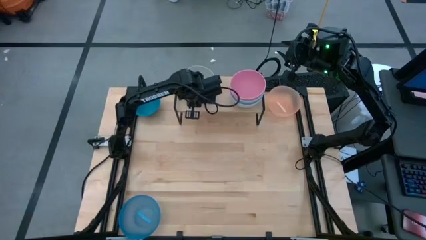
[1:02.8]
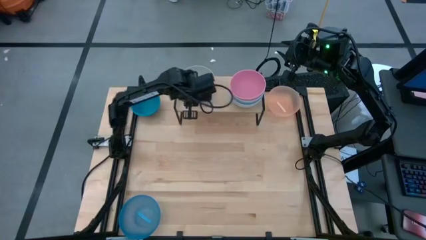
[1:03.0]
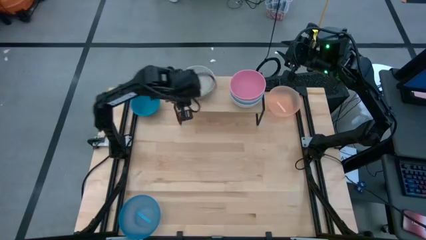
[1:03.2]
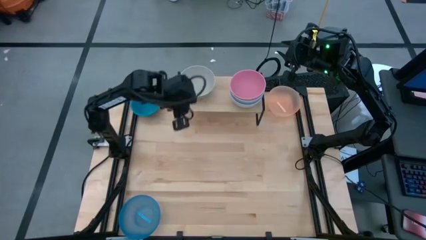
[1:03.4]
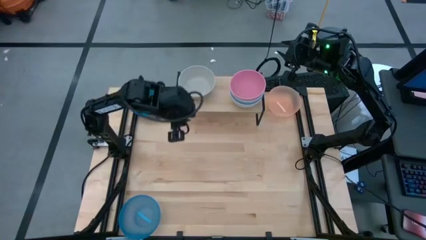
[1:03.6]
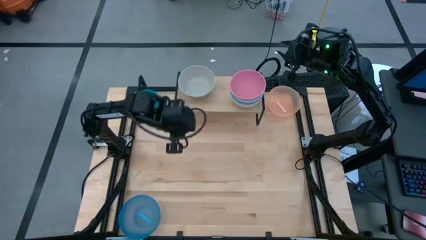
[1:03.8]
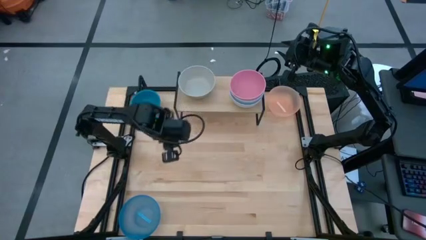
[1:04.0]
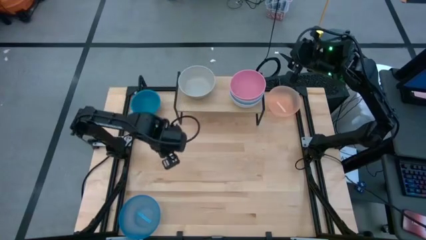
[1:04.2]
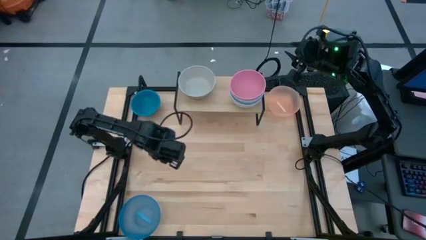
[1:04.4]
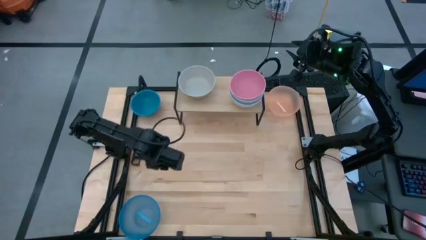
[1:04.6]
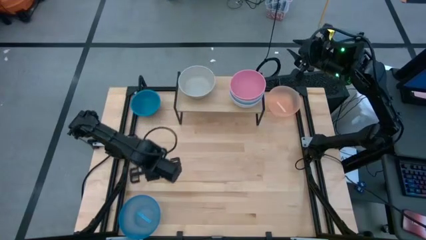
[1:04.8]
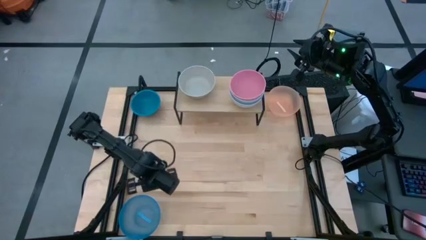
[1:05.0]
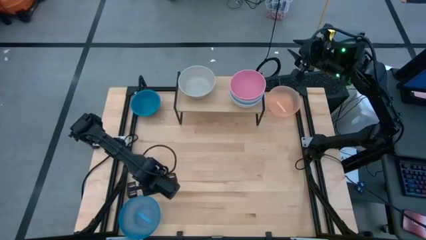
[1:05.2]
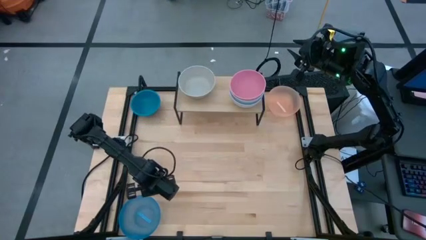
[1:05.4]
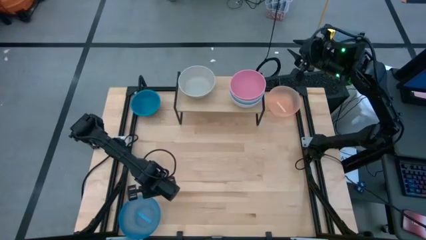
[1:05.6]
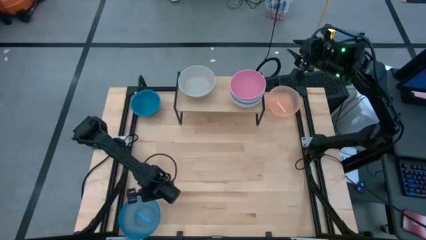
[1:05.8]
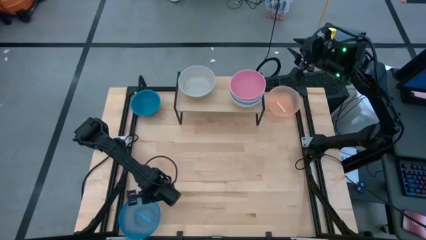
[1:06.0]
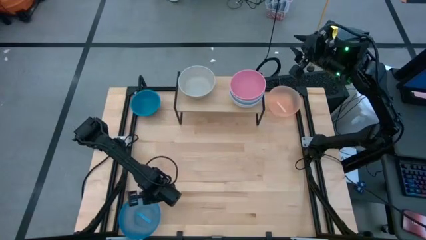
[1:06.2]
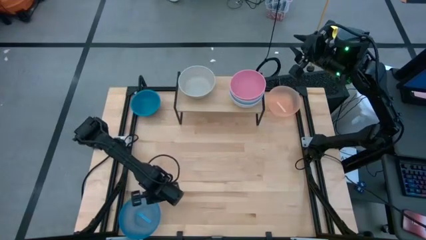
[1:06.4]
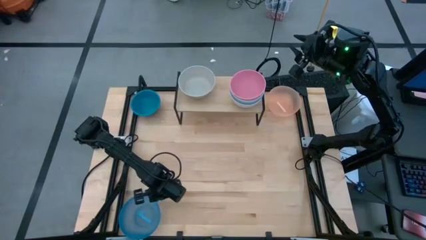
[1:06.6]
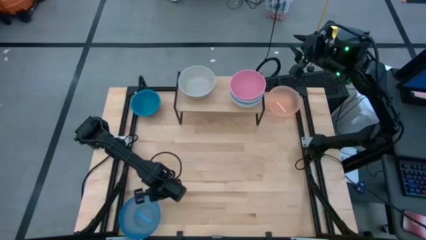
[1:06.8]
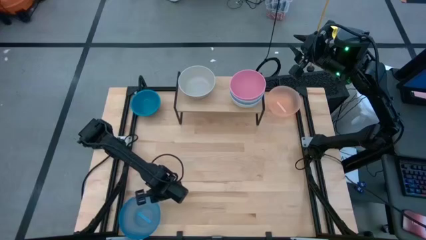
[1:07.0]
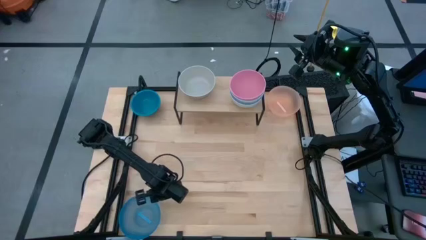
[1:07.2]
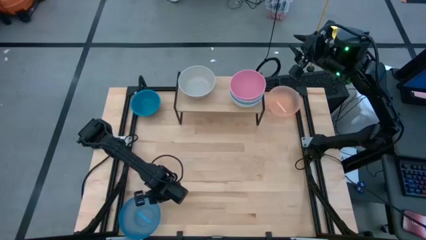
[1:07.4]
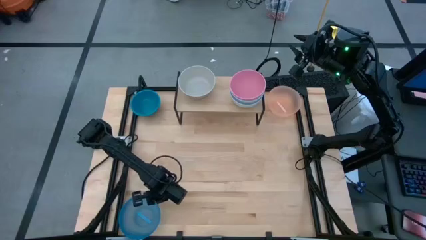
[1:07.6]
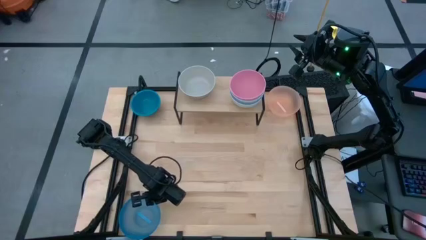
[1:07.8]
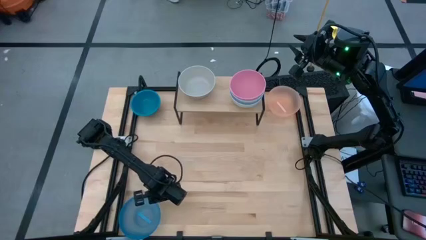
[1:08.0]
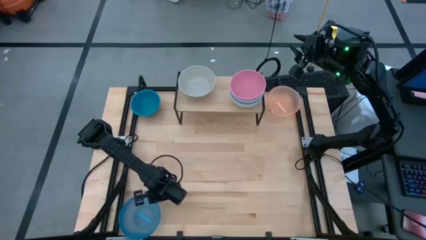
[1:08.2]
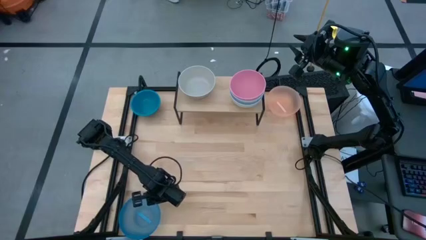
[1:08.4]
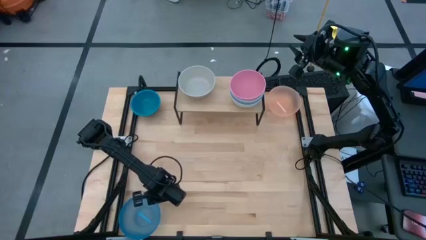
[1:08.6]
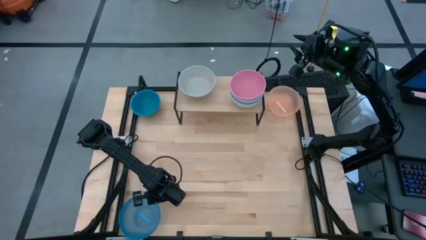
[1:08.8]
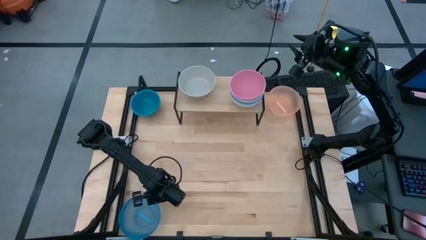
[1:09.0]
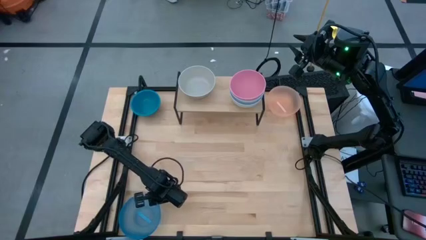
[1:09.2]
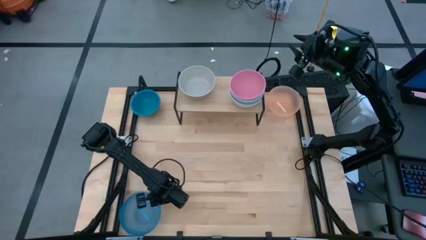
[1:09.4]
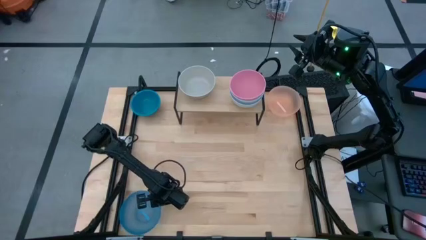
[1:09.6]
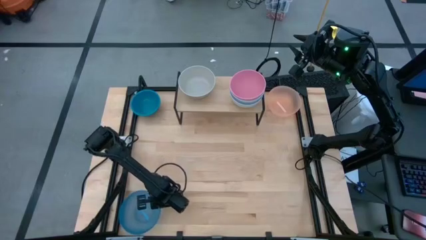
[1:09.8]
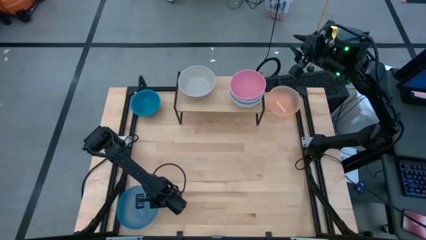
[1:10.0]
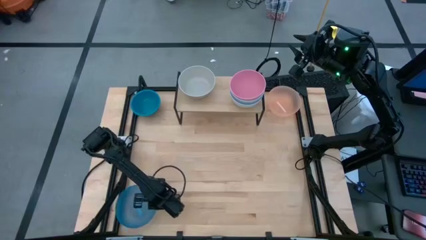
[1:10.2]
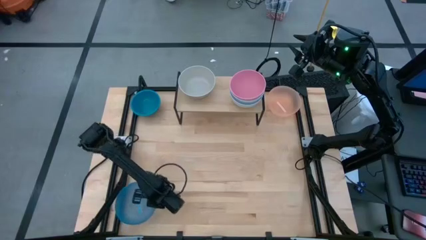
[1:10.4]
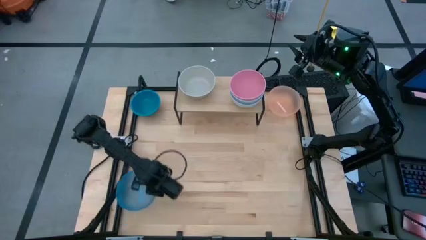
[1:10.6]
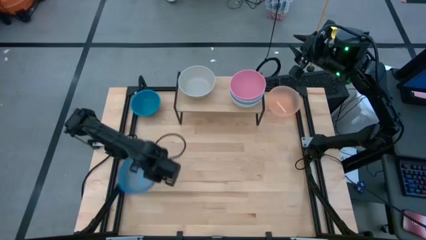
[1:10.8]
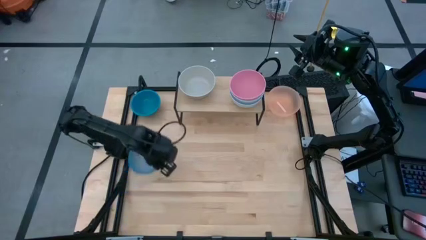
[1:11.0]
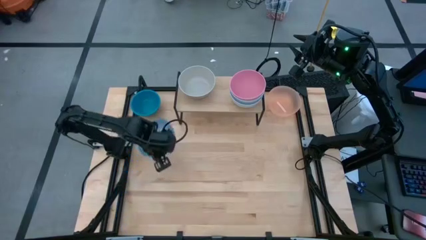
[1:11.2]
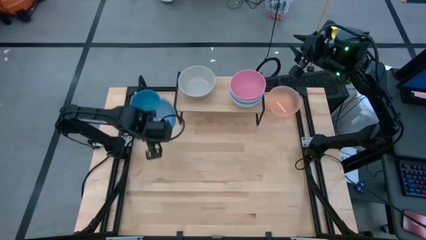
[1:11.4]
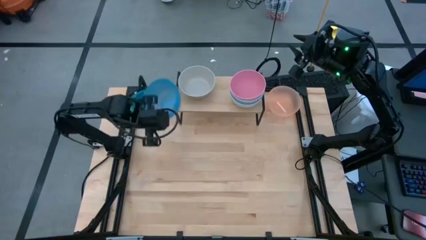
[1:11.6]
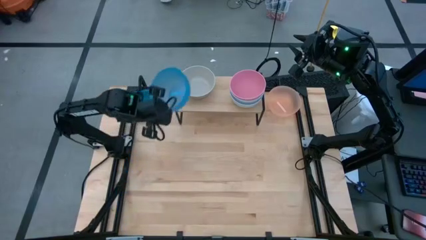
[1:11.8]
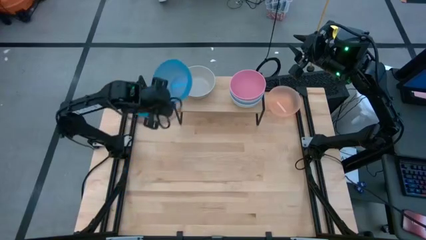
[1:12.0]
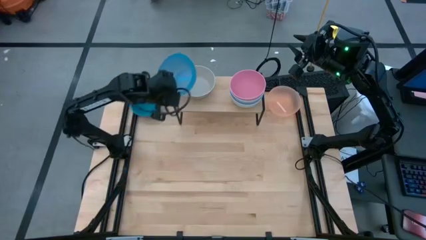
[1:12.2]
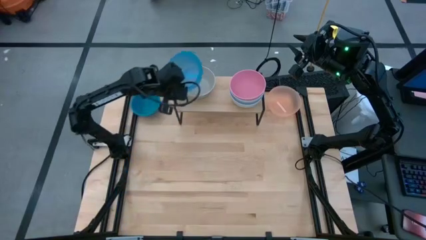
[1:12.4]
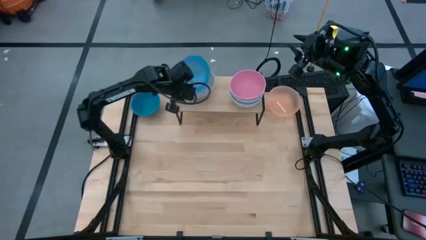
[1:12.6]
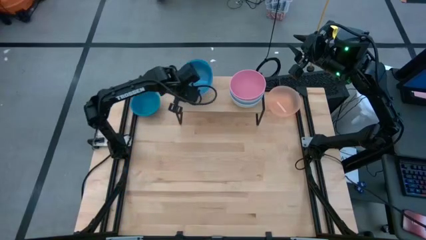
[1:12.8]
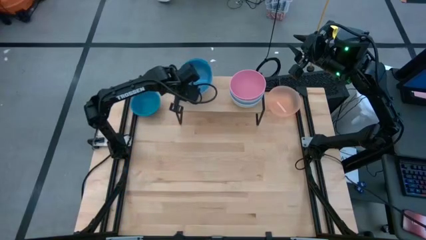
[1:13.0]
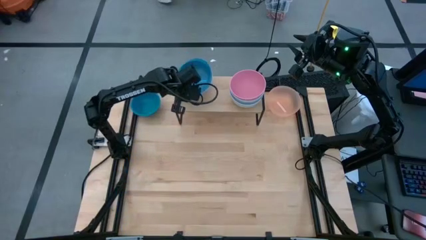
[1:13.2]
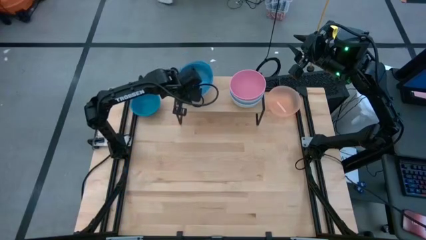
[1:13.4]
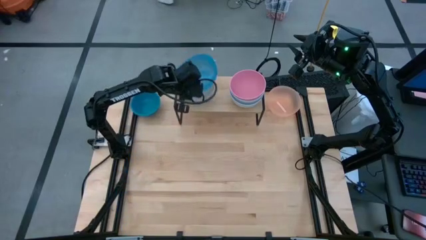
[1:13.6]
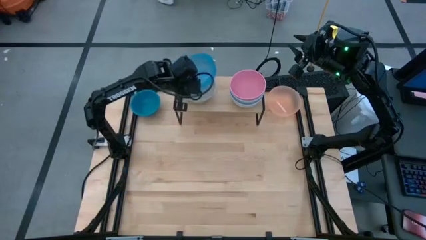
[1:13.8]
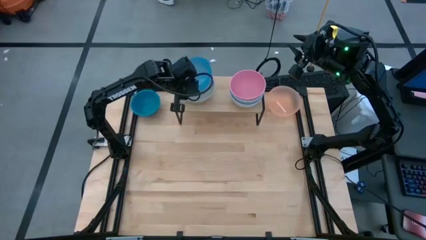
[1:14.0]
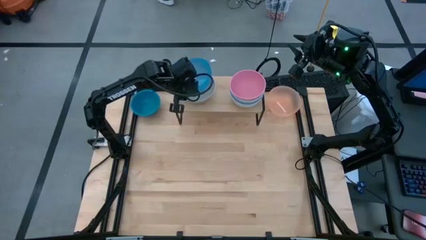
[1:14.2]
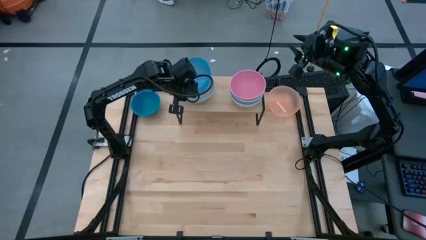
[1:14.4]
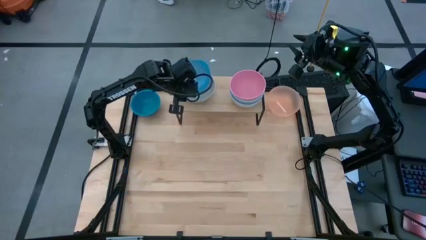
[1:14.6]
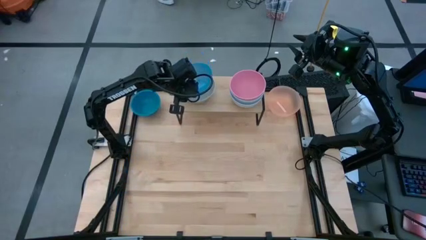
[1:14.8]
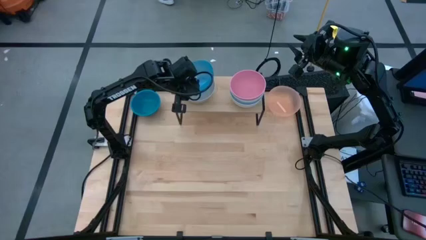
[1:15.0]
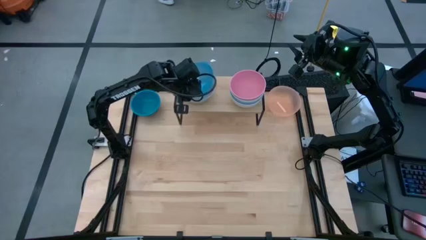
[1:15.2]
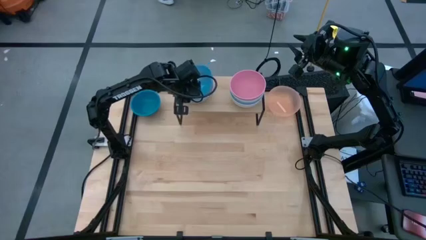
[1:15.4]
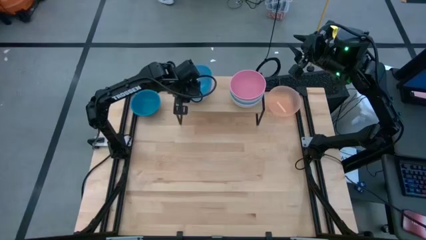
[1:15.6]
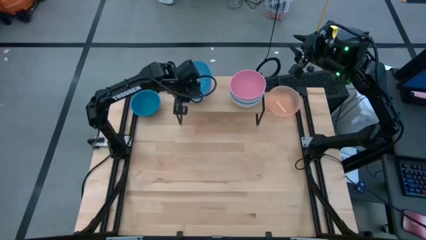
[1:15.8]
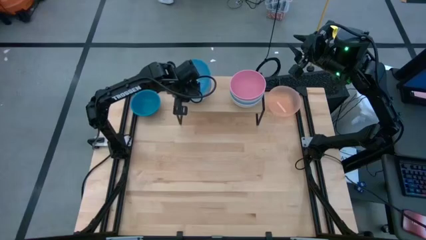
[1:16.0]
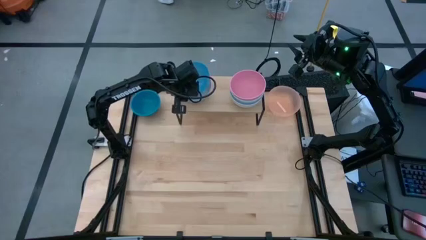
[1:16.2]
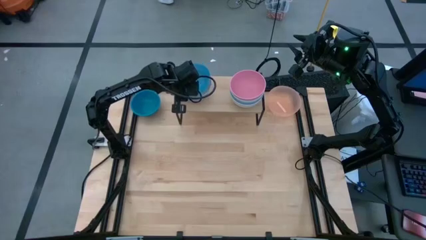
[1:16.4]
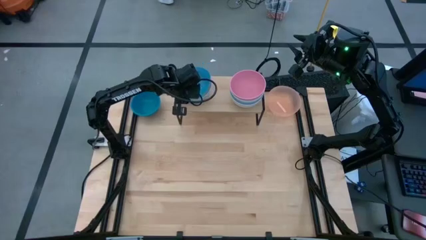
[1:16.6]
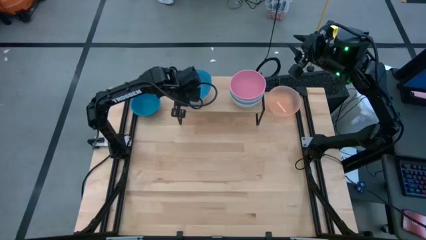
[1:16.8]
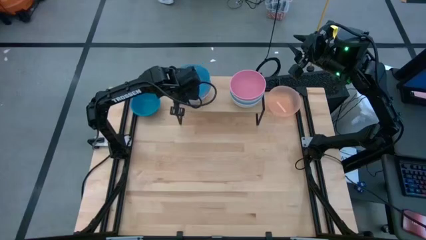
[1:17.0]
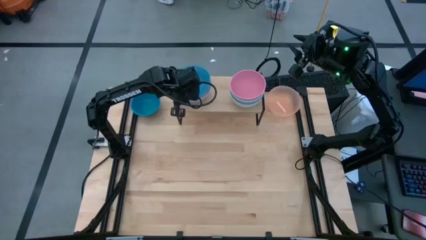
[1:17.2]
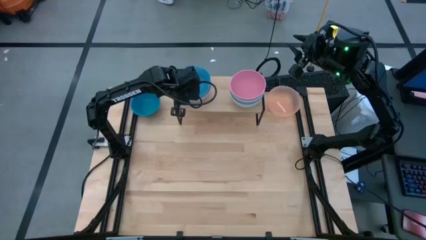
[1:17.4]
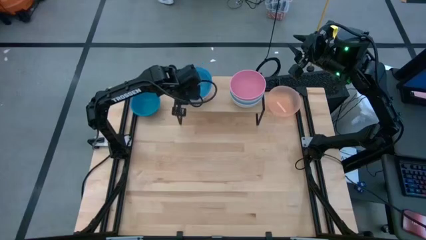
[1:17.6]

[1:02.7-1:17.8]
Task: Place and stack bowls onto a shelf
Stack the light blue bowl on top of the gray bowl on the shelf

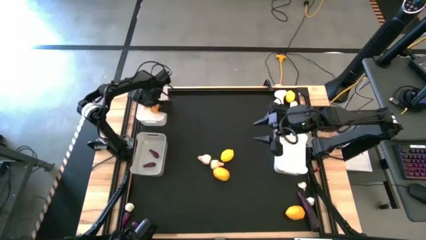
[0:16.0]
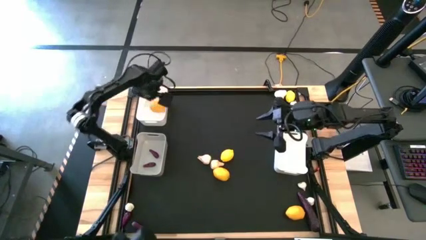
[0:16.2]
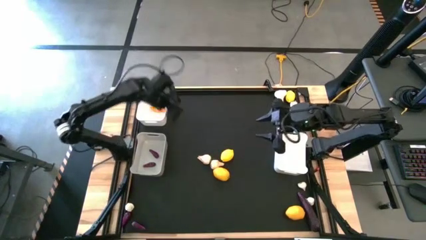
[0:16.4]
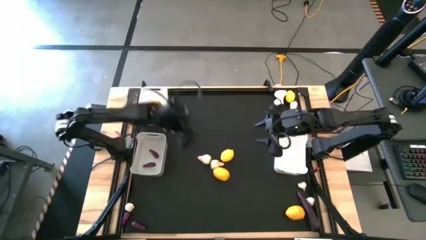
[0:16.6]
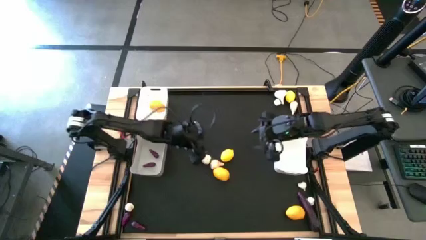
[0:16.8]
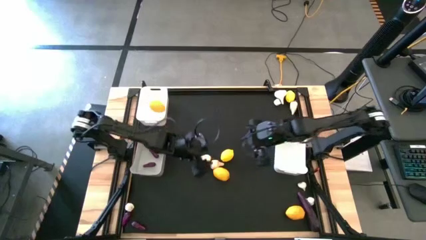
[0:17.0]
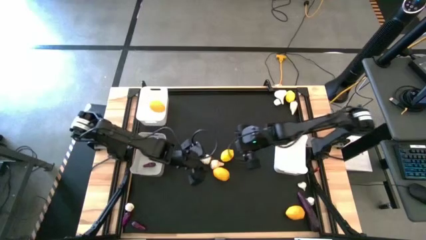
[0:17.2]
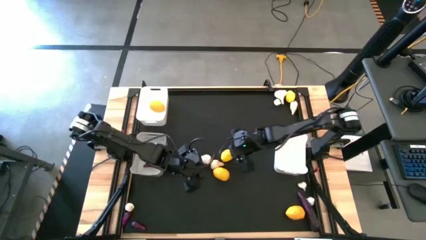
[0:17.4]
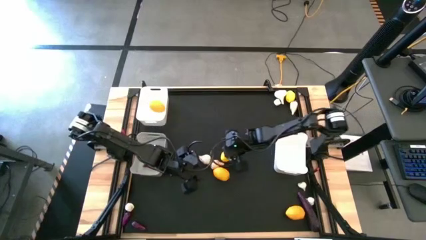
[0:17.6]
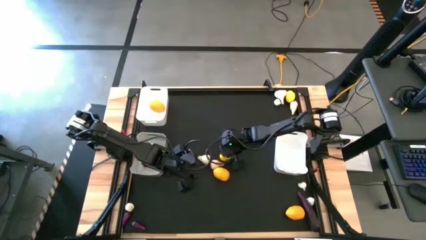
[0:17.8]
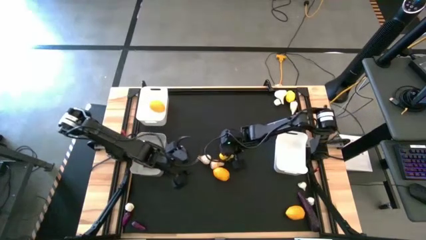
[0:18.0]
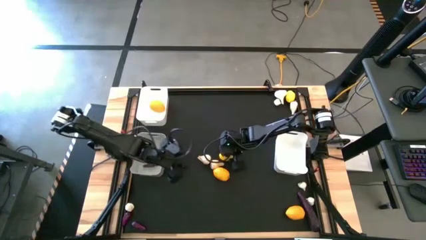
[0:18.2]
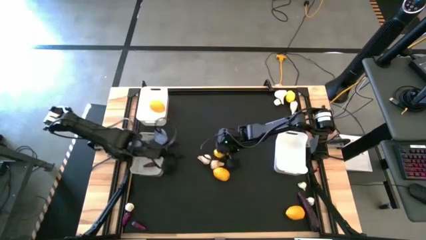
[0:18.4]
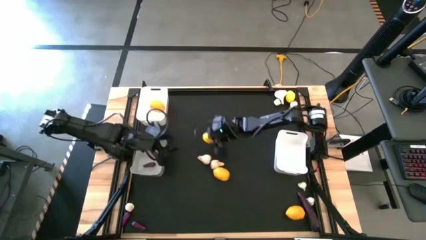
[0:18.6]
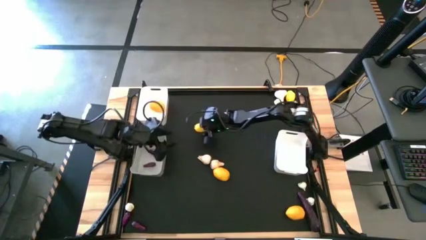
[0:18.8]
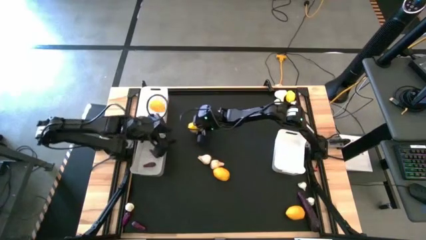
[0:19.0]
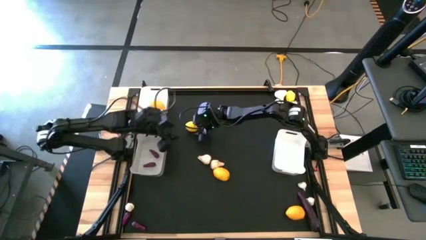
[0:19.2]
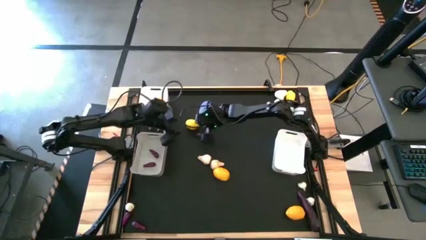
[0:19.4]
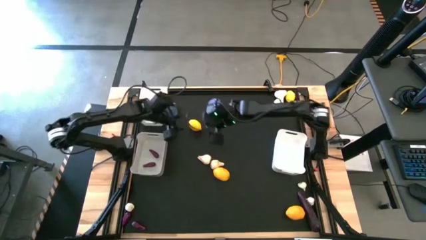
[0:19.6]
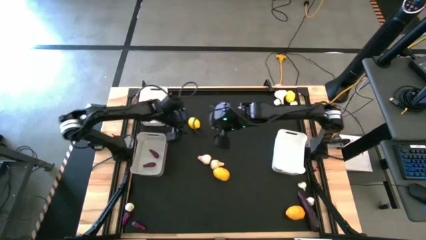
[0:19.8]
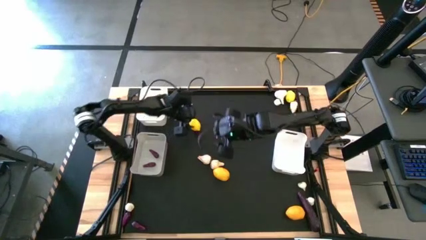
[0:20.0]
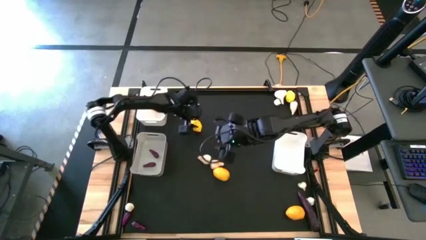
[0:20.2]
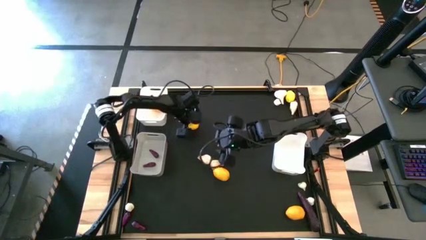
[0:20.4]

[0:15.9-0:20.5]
Task: Sort produce into baskets
Put the yellow lemon into the top white bin
